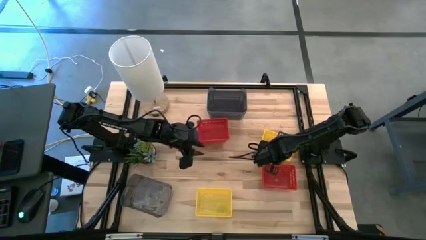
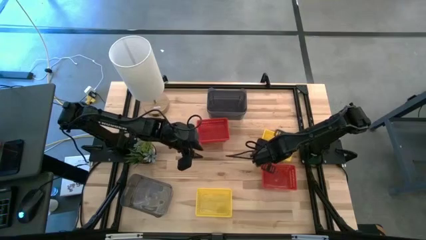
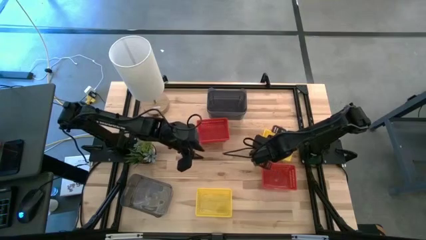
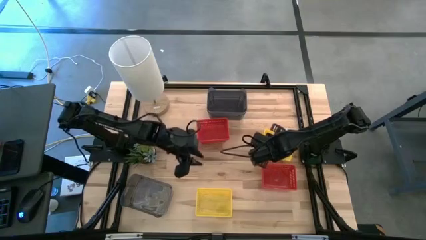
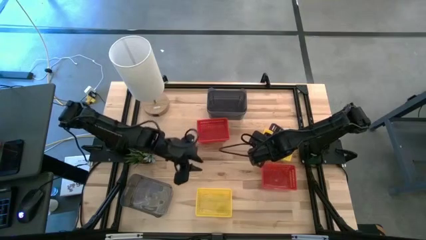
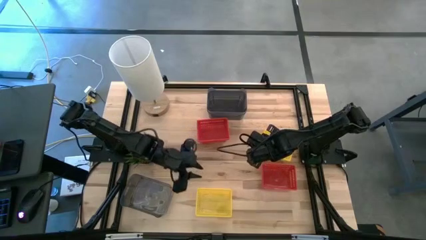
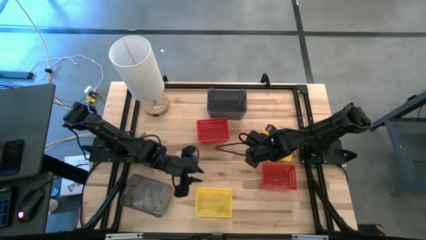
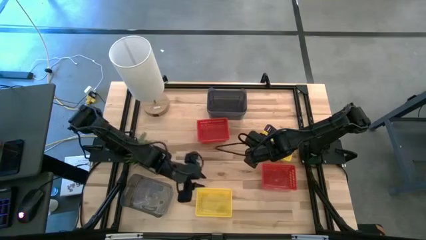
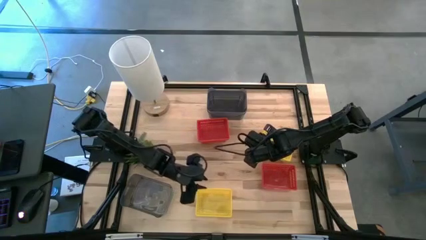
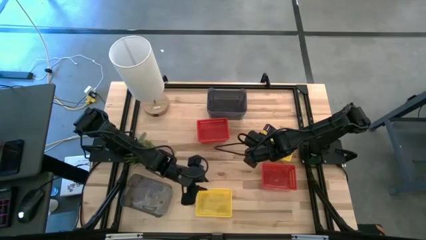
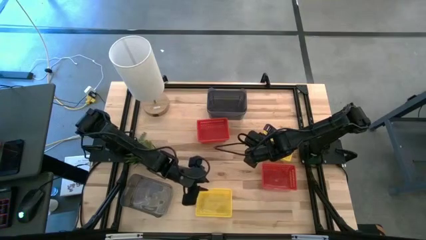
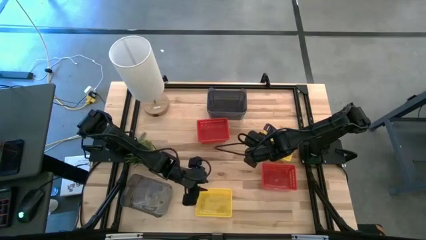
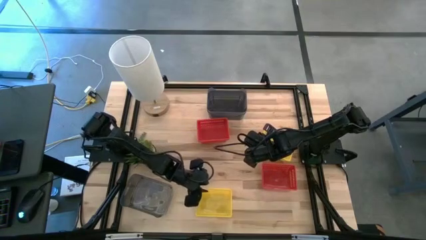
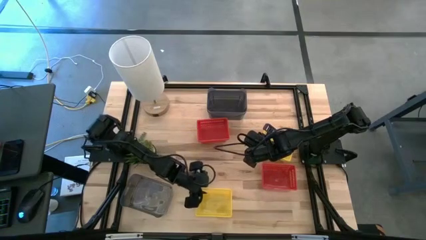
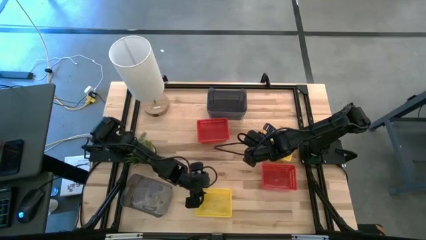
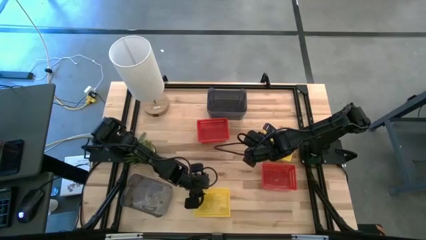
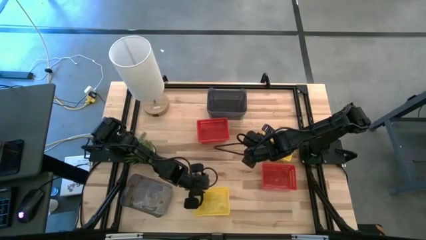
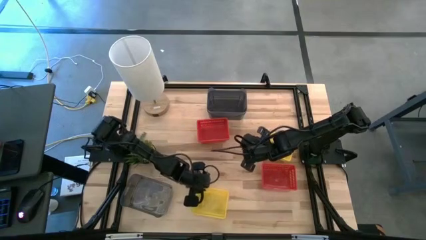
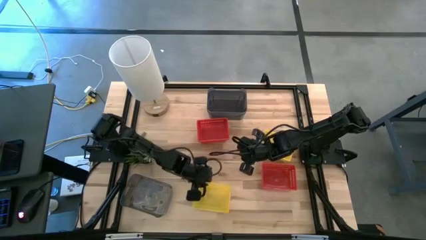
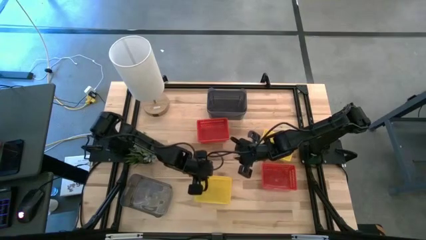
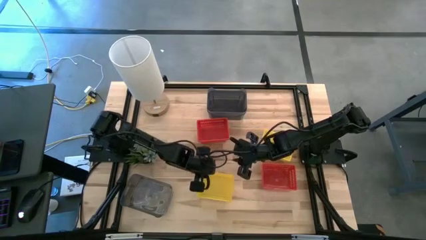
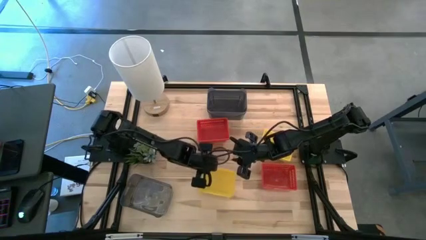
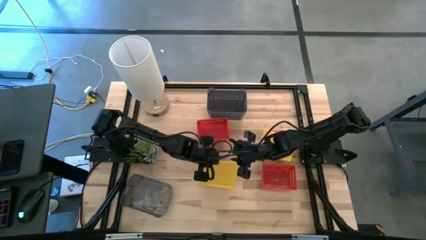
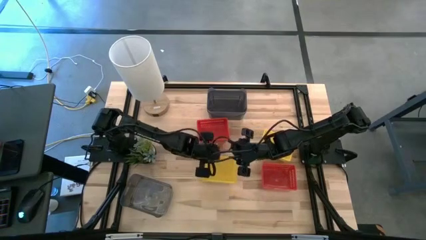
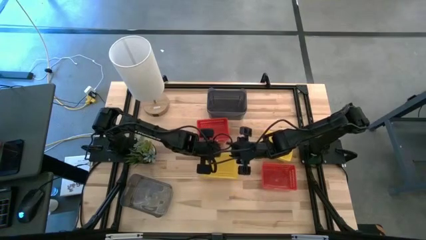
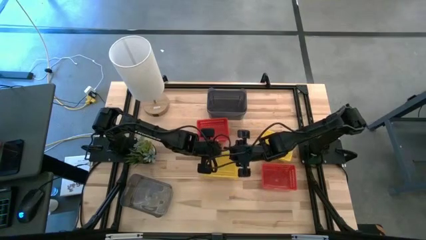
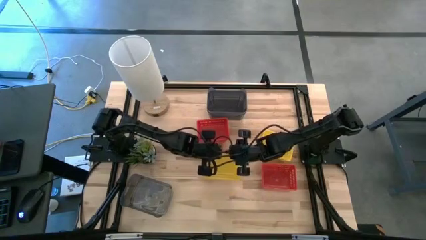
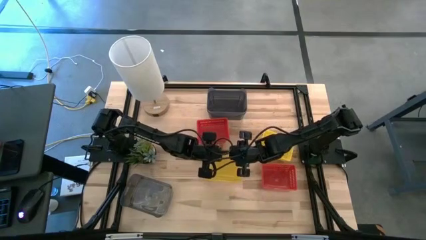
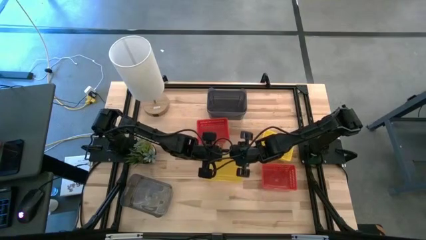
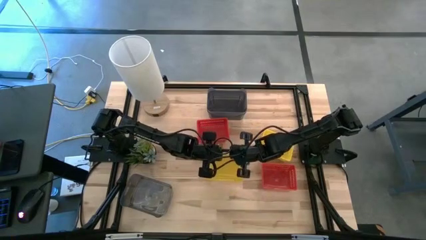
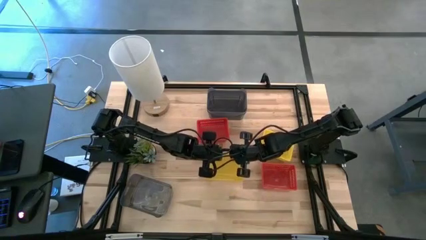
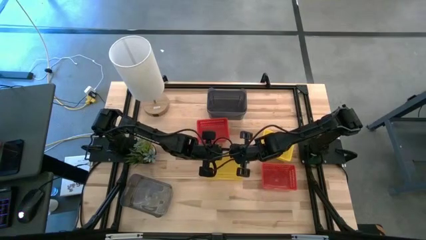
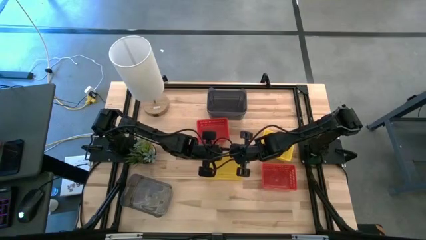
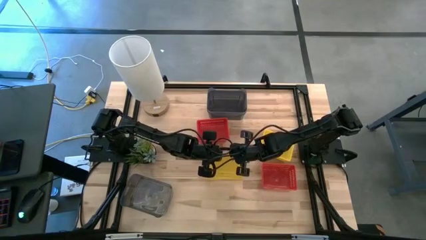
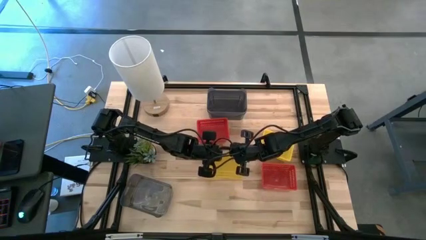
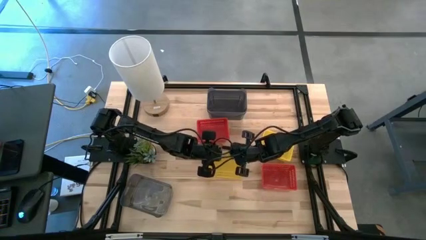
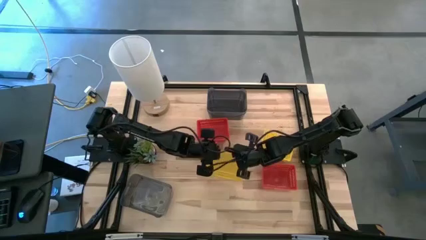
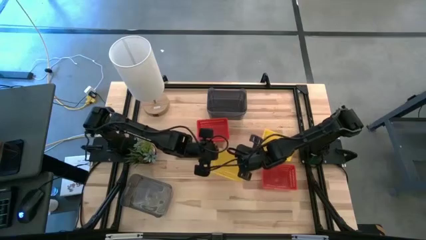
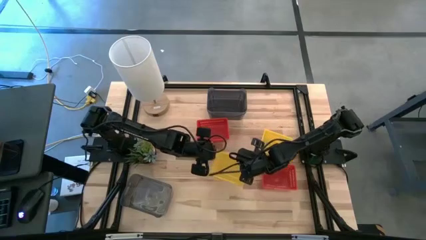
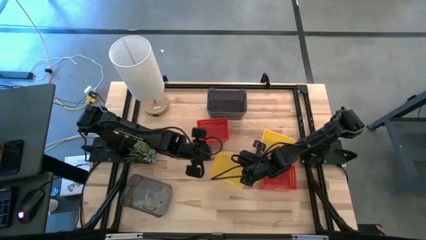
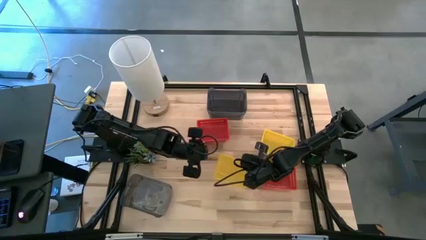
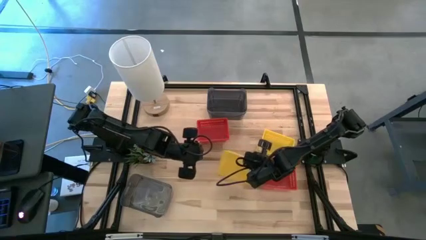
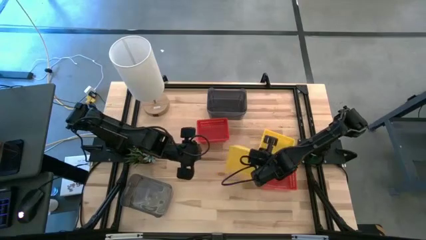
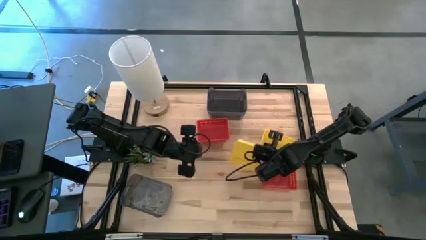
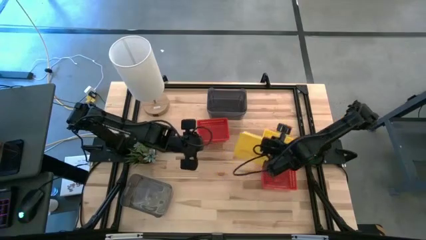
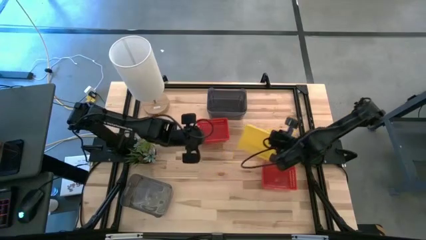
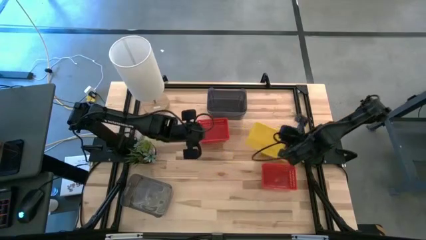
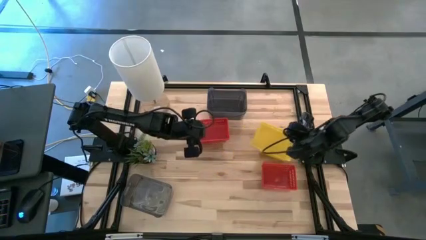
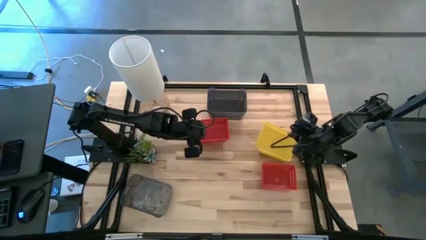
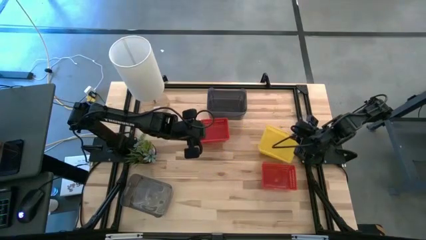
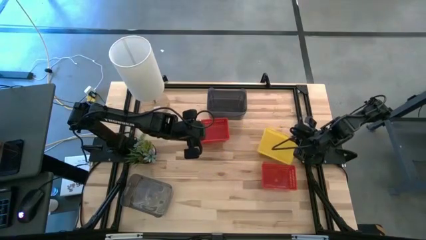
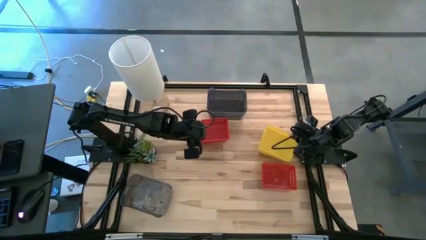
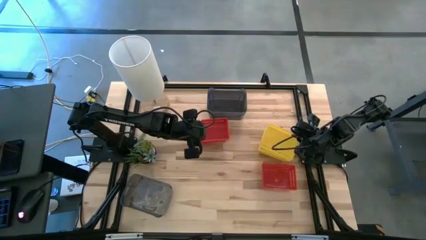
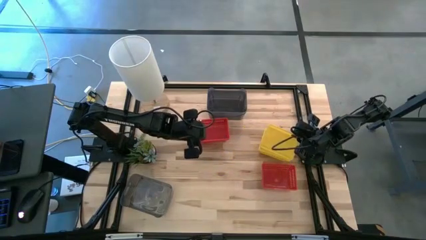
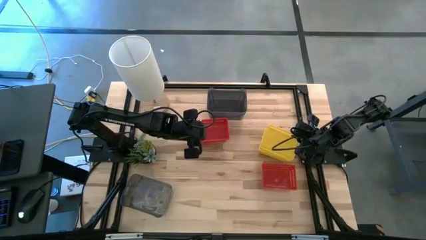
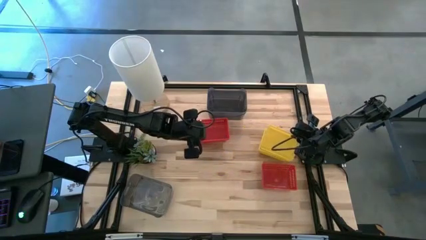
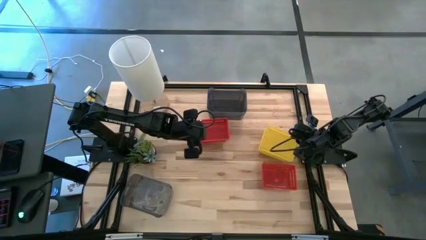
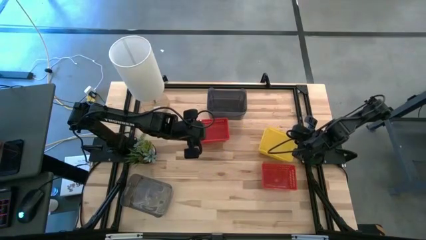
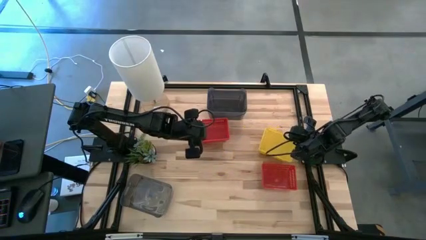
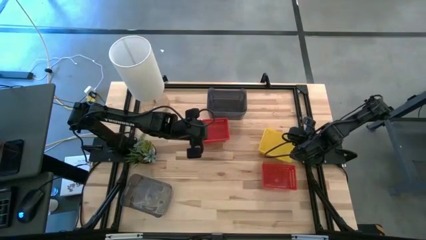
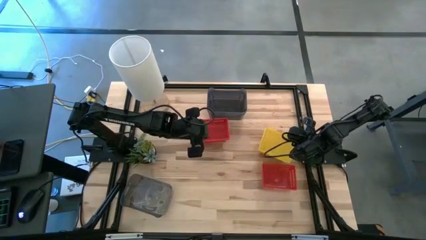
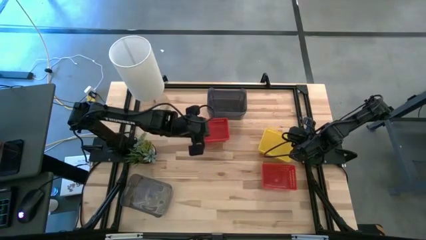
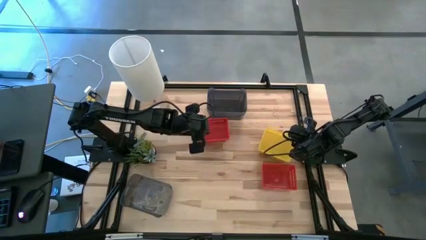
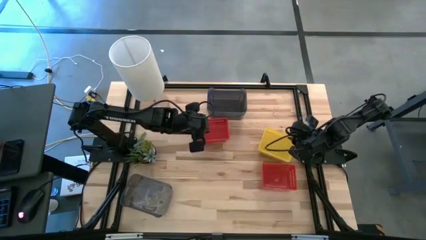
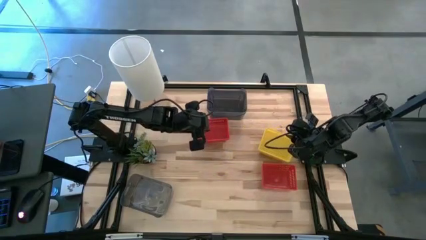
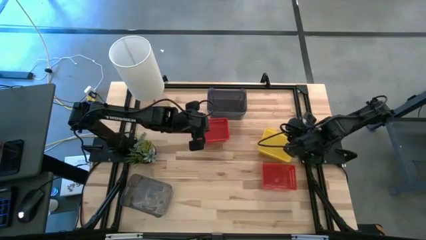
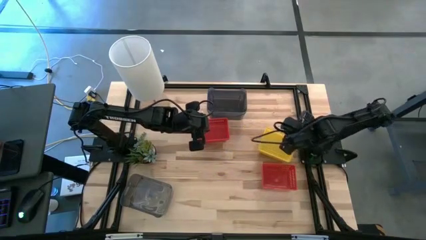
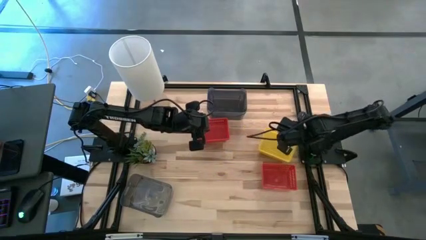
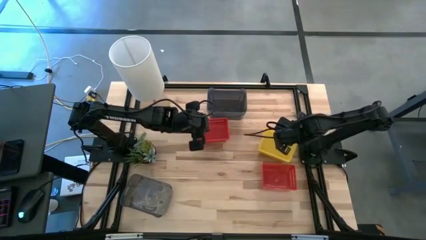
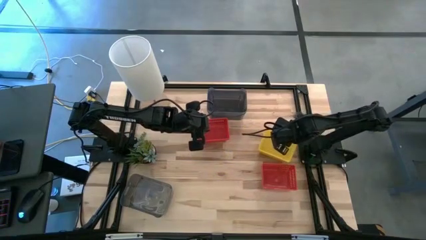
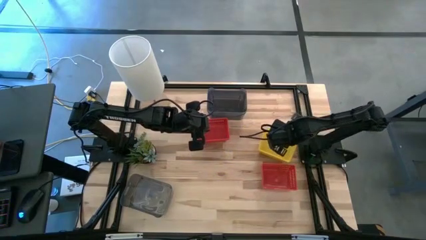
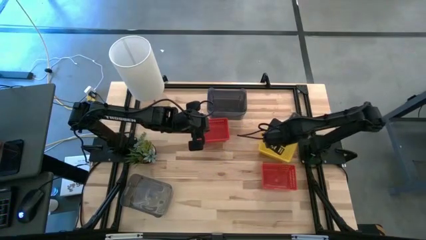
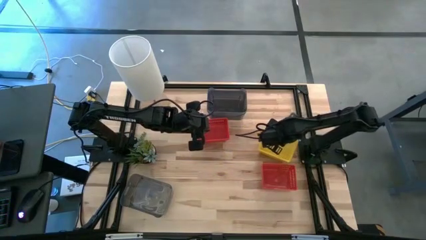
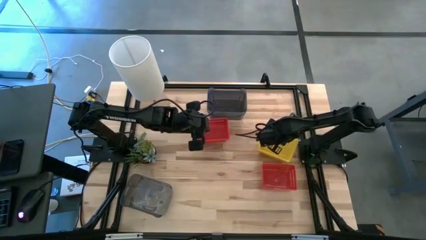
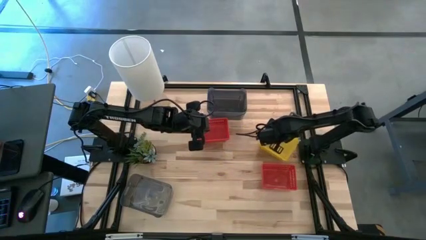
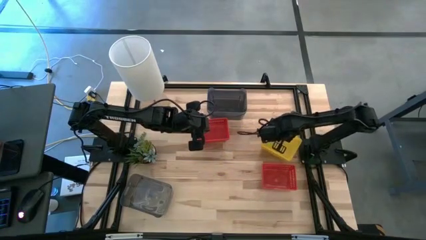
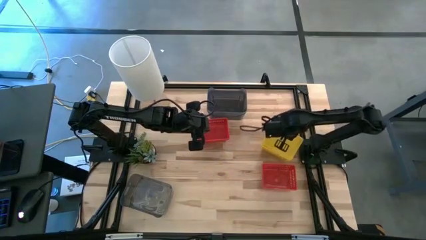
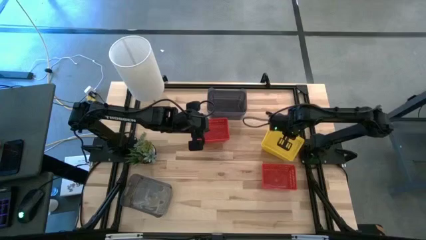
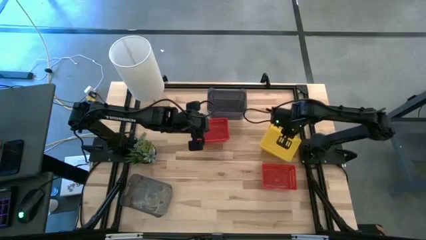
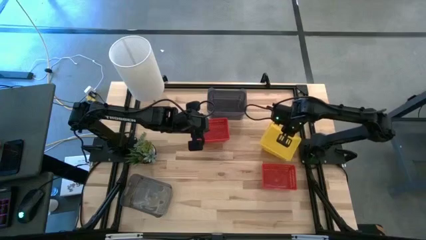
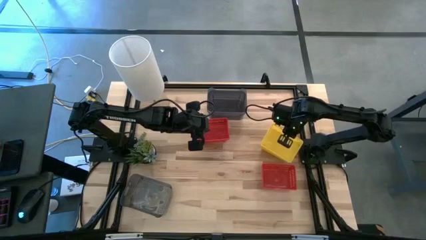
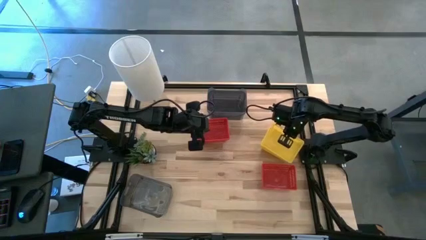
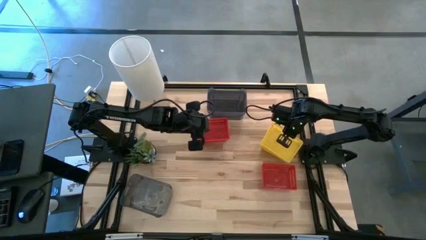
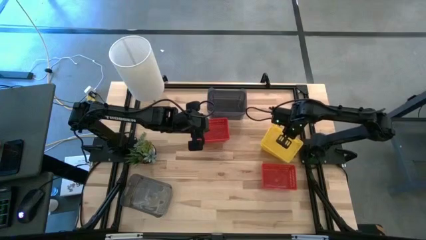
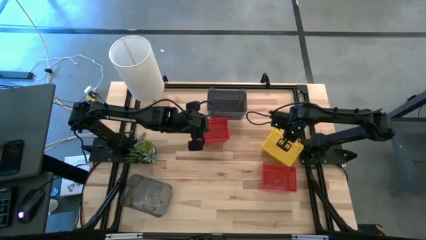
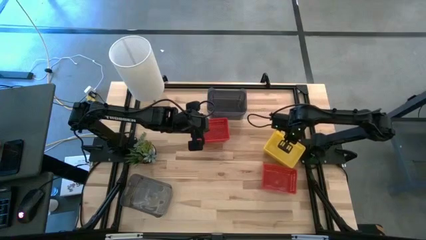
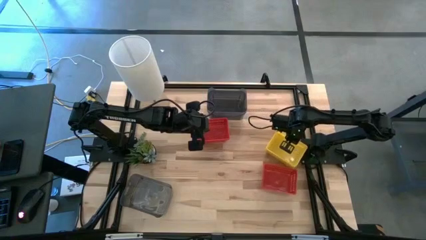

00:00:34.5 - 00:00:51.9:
Stack the yellow bin on the stacked yellow bins
